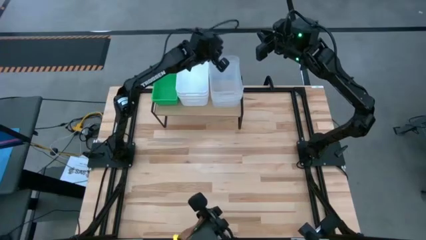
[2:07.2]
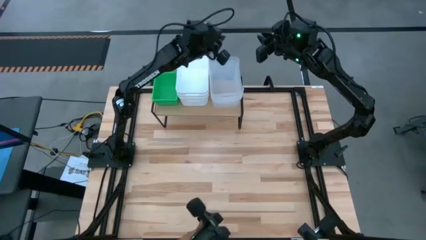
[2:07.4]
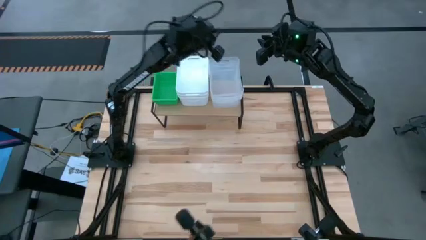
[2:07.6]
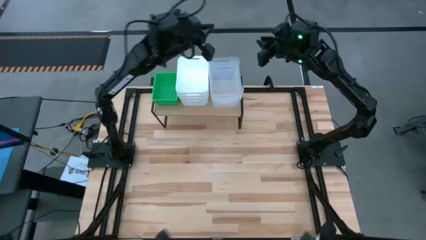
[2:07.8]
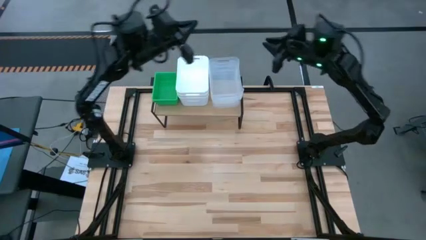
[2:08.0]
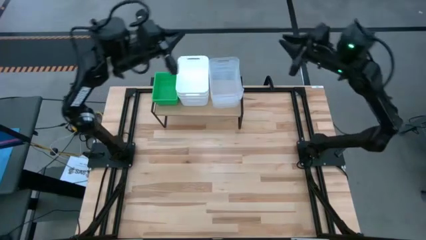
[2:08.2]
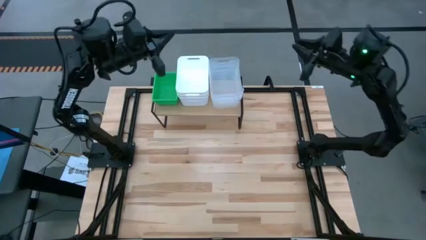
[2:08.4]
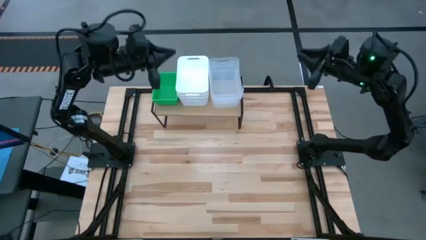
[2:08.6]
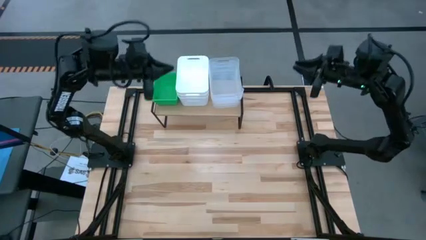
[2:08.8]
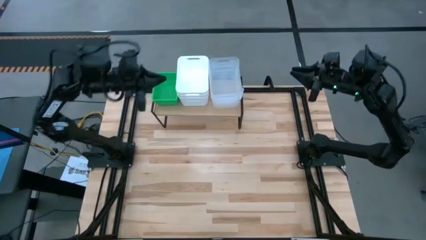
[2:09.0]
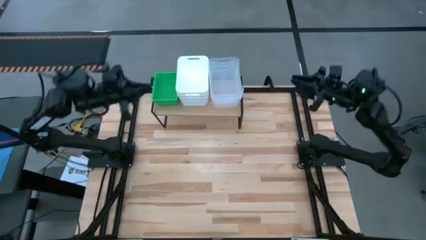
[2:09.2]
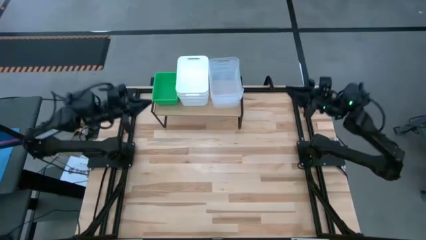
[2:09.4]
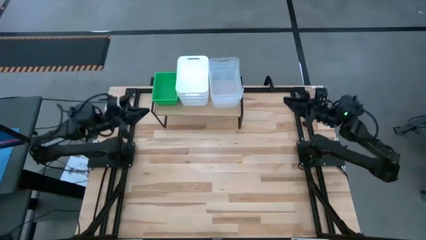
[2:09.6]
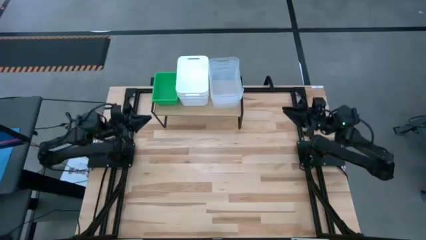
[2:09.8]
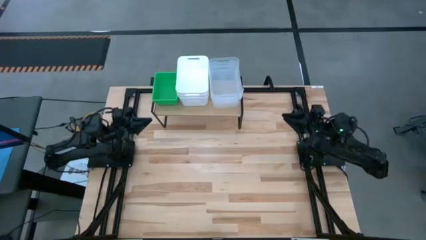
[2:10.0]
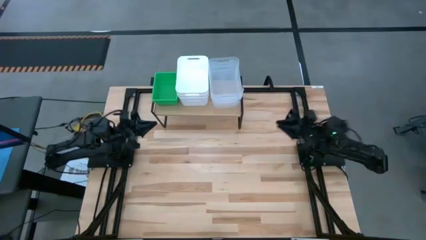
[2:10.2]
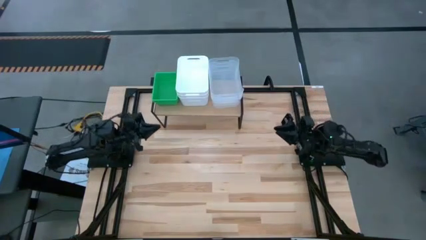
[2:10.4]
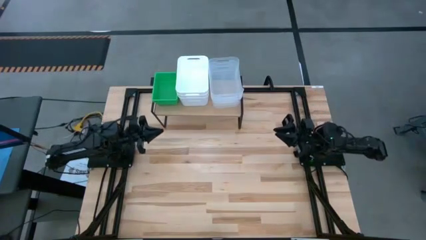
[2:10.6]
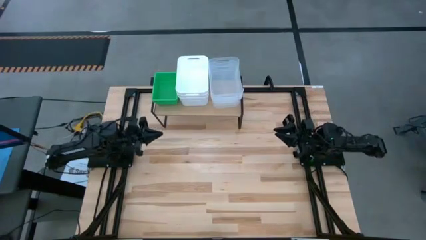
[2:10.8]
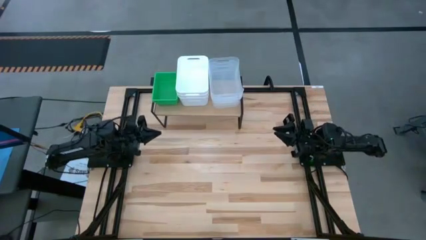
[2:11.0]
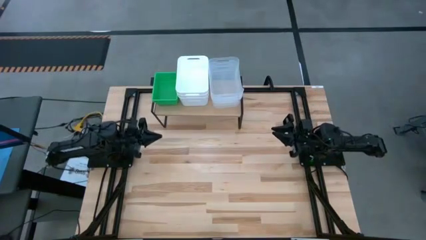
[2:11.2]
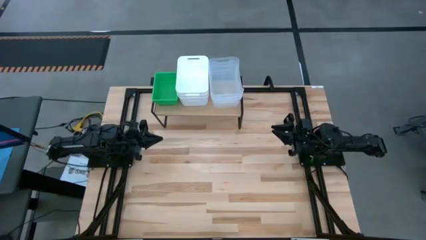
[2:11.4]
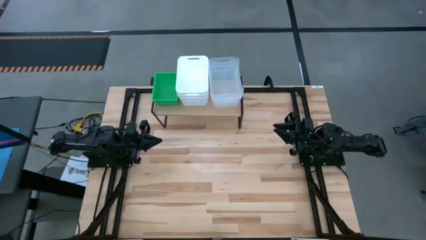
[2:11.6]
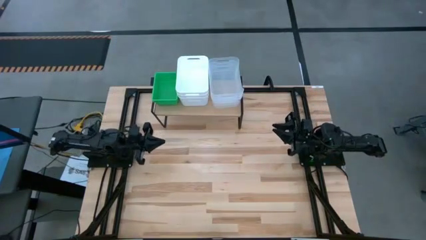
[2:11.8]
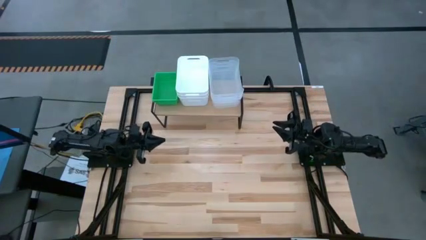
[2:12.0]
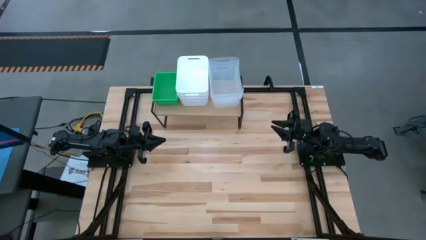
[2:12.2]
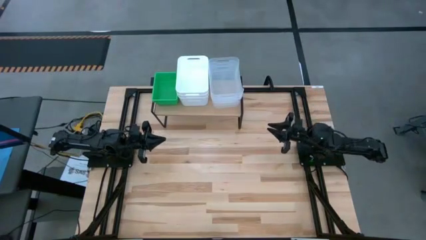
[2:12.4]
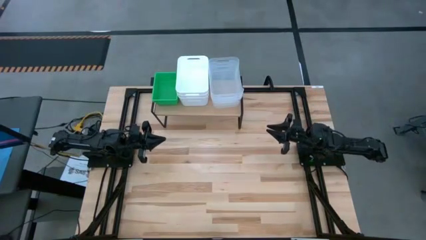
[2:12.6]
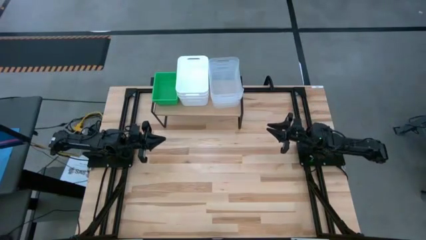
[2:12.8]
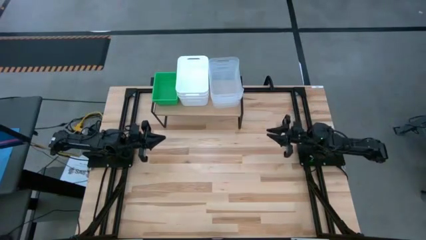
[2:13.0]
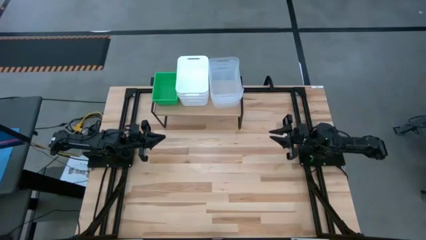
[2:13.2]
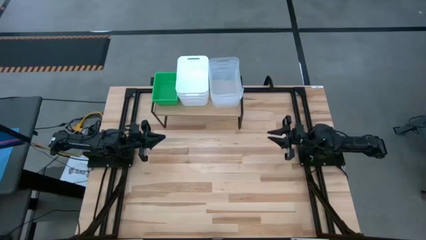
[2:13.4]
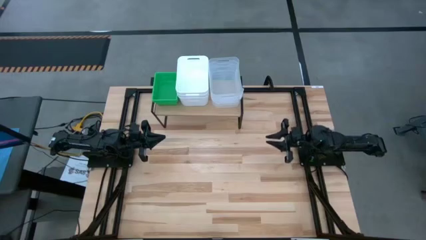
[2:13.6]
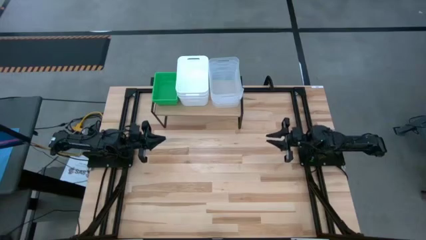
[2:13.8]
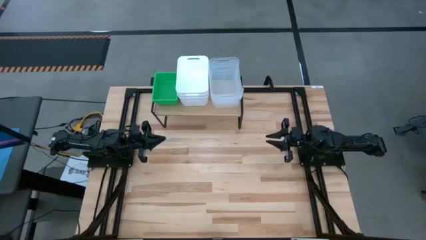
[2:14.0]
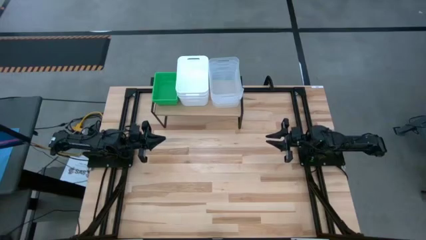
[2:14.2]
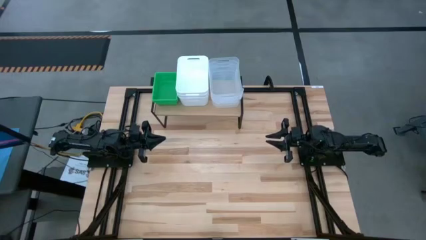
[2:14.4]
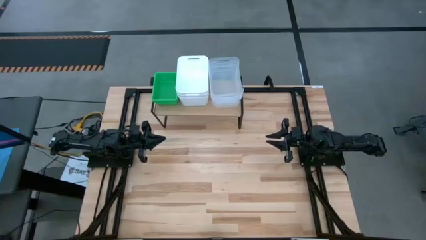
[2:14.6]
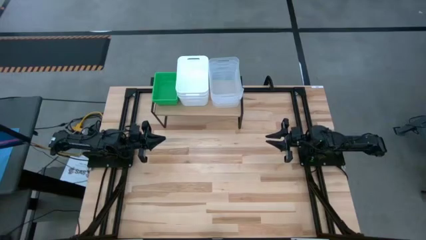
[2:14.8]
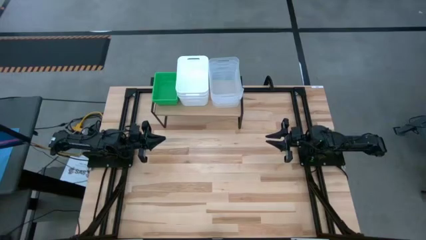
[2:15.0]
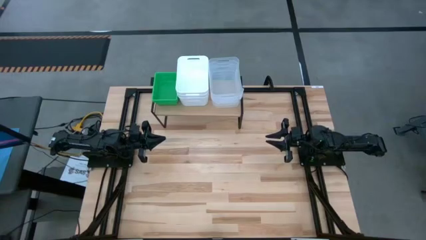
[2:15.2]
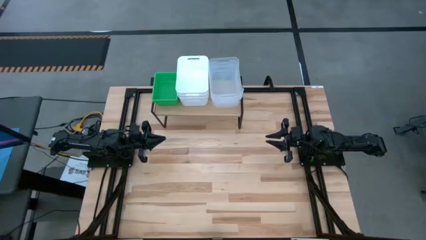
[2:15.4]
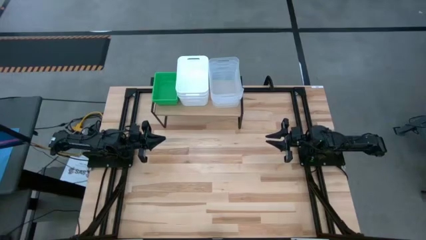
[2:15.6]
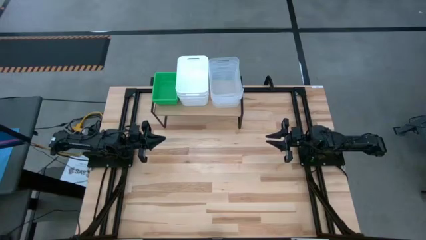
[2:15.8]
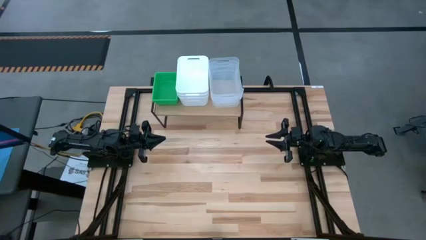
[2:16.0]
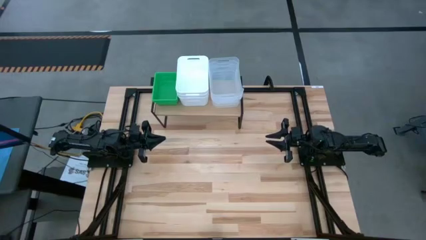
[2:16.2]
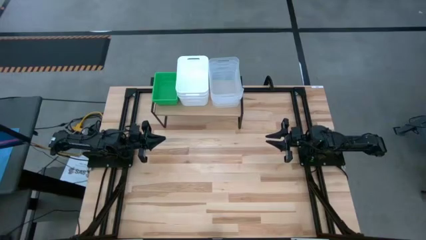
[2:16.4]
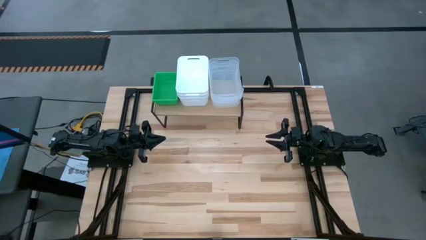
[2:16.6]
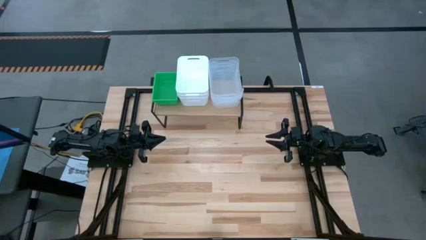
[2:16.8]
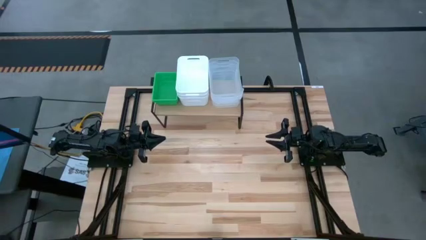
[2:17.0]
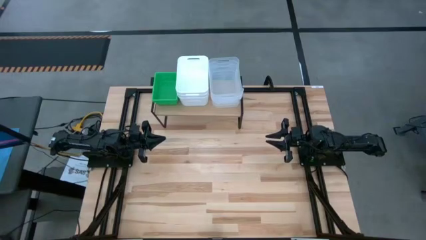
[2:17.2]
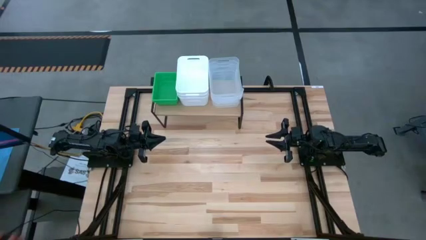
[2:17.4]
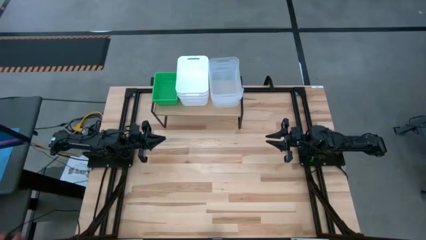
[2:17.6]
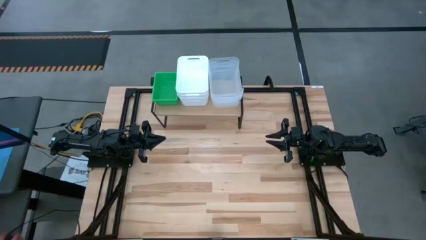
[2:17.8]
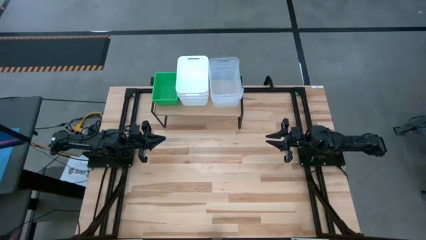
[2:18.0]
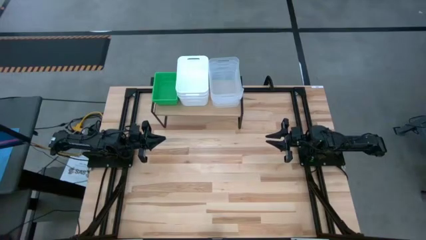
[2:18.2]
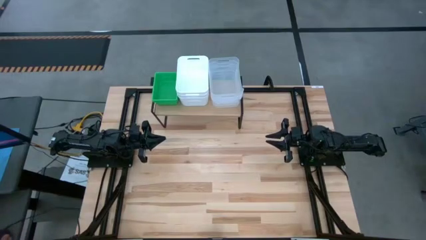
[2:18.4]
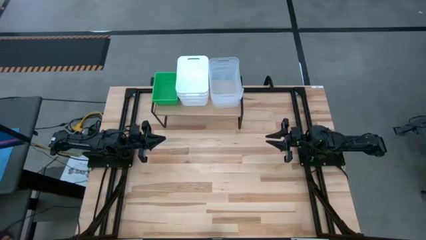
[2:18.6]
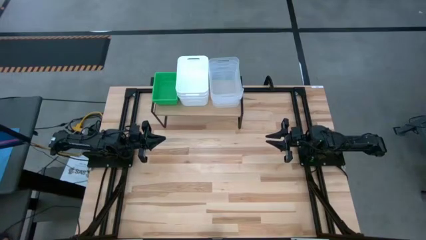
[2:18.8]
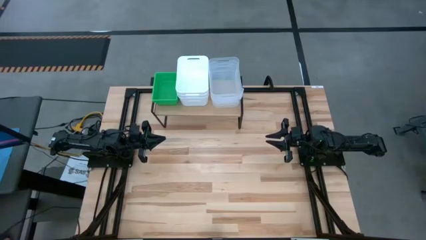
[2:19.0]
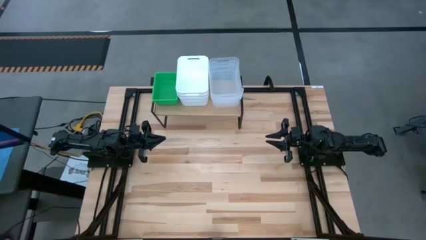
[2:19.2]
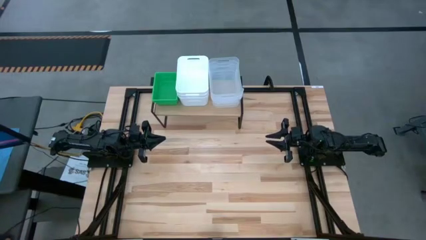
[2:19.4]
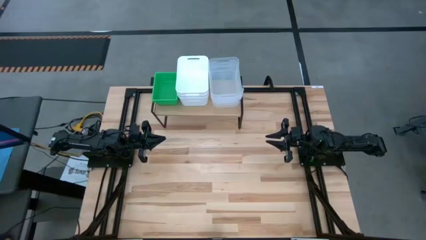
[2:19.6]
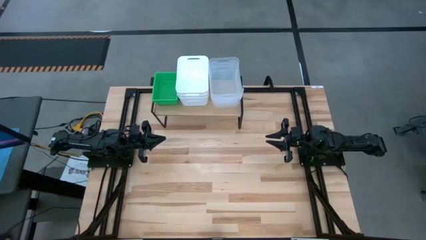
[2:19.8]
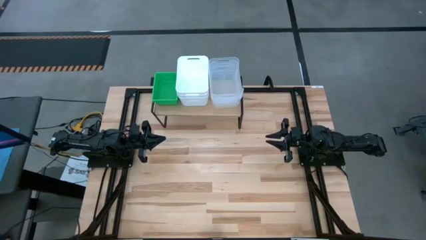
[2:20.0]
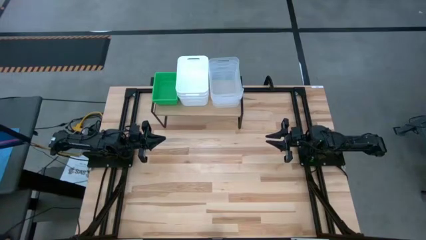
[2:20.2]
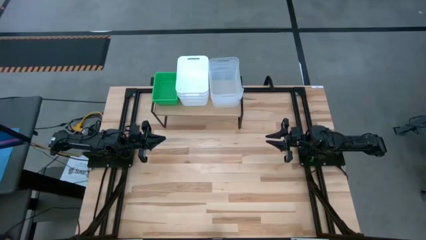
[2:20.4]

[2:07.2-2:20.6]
Task: Stack baskets on shelf by color
Return to Home Position

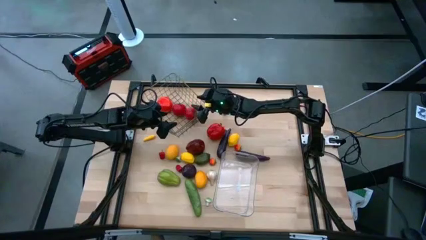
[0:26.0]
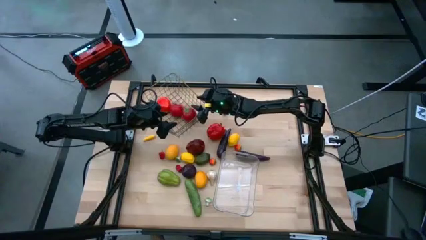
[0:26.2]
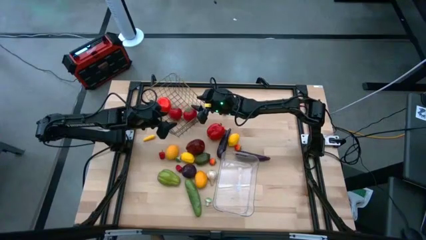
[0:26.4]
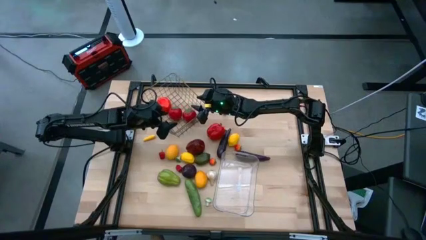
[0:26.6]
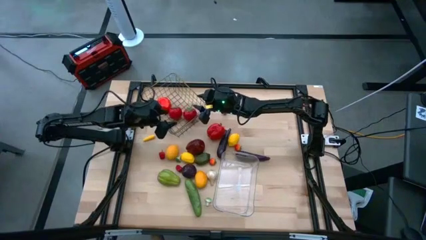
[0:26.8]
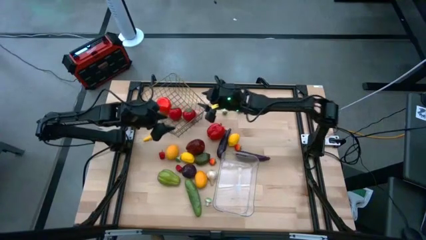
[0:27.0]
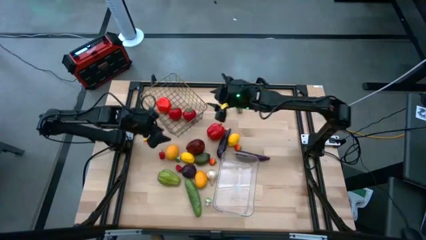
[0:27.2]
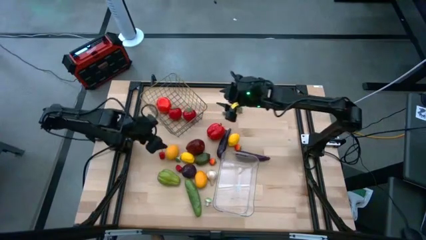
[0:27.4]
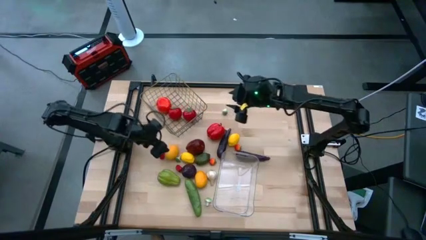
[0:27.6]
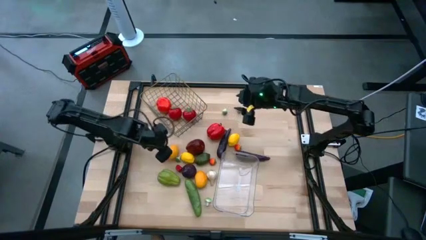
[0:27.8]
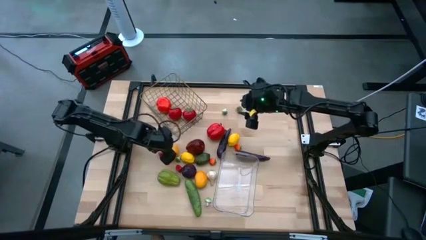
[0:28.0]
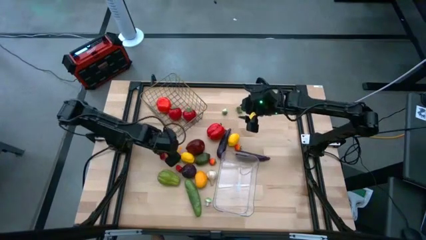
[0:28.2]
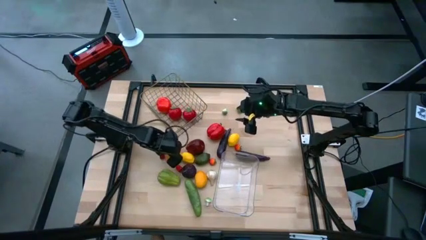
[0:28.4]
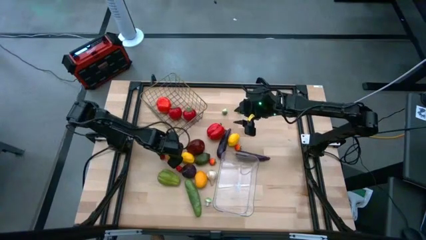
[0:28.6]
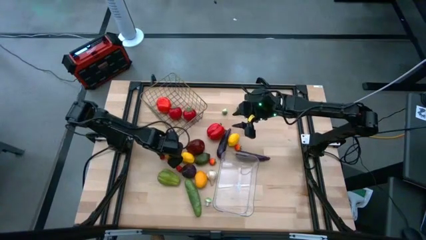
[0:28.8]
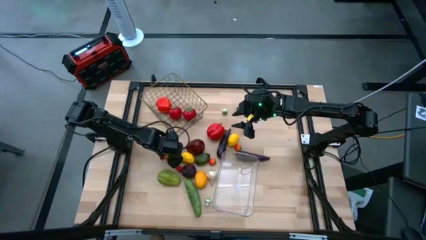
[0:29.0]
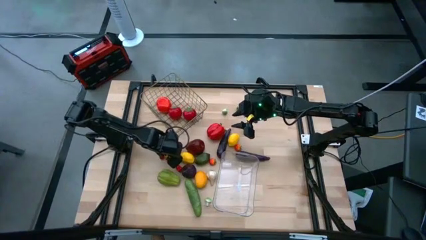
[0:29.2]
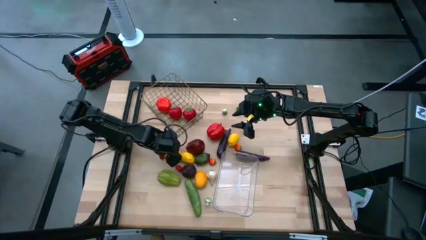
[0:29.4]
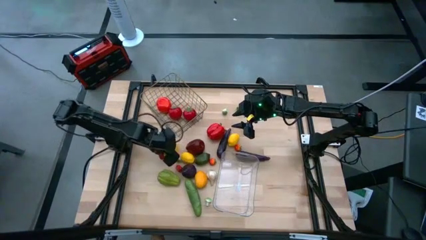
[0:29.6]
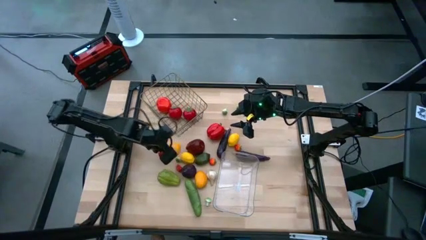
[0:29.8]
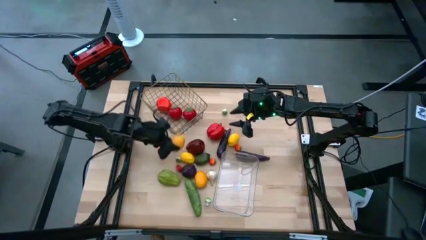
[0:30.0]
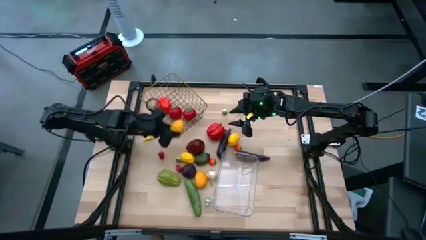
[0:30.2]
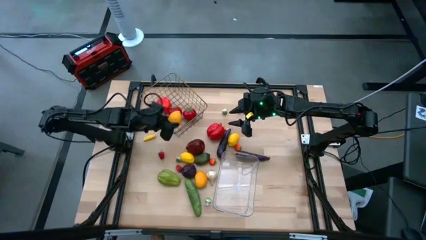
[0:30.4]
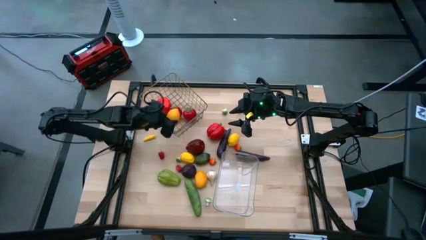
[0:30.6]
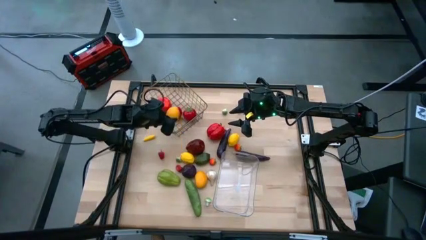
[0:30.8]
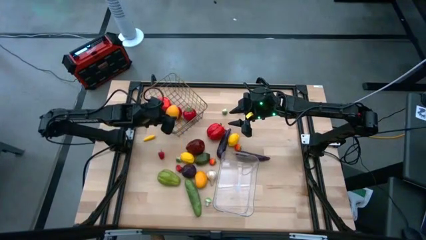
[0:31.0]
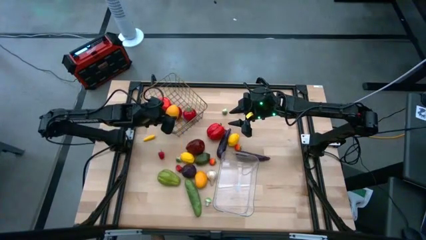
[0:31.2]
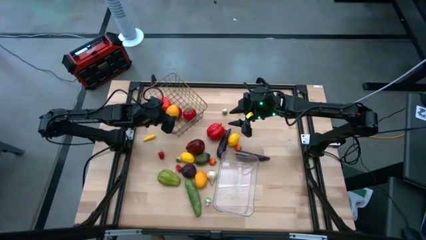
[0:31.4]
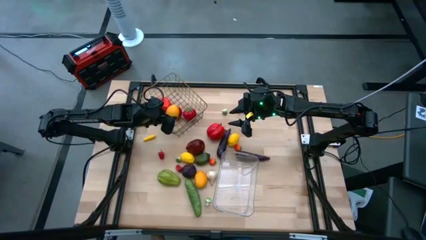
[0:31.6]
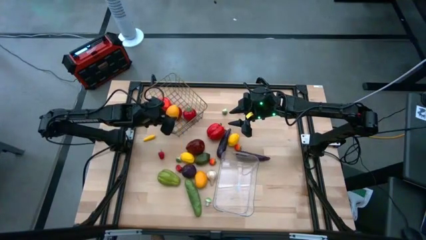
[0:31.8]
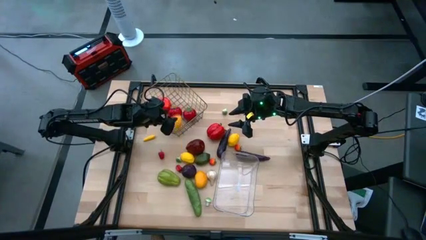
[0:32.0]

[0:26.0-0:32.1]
Task: Sort produce into baskets
Put the yellow lemon into the wire basket
